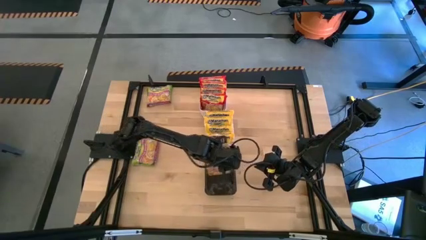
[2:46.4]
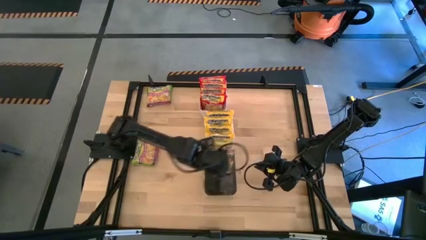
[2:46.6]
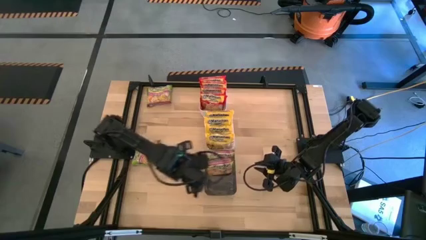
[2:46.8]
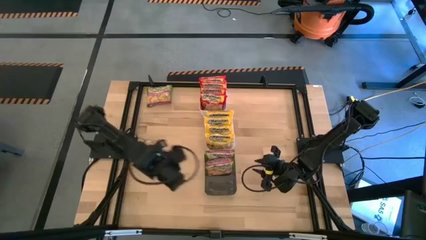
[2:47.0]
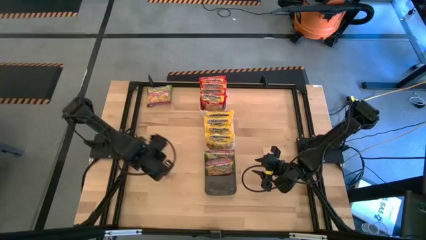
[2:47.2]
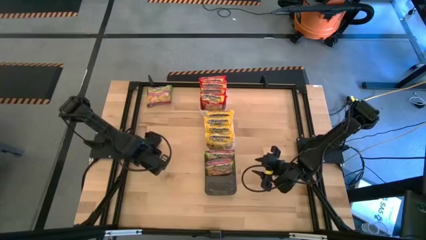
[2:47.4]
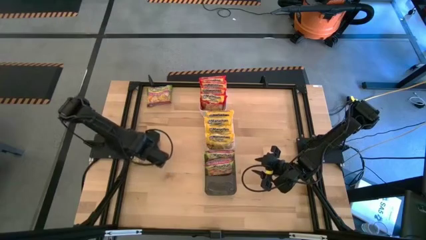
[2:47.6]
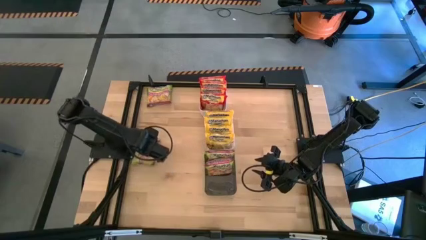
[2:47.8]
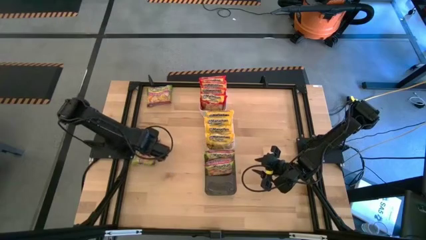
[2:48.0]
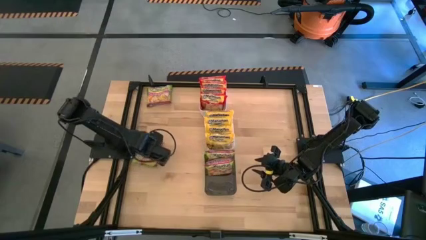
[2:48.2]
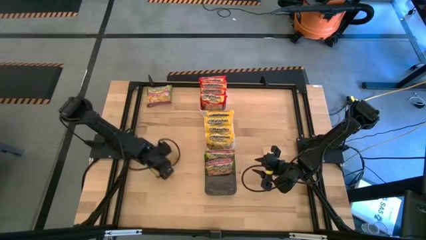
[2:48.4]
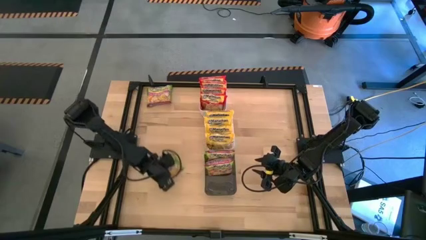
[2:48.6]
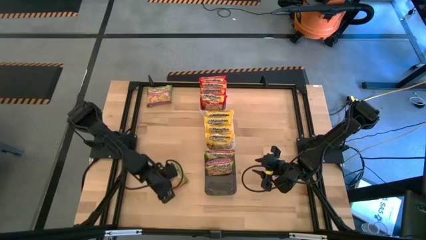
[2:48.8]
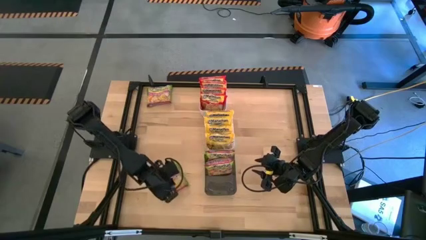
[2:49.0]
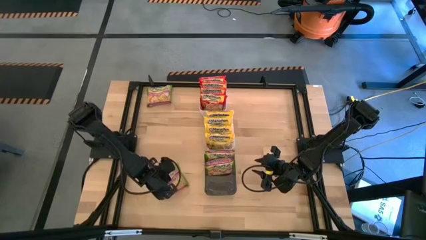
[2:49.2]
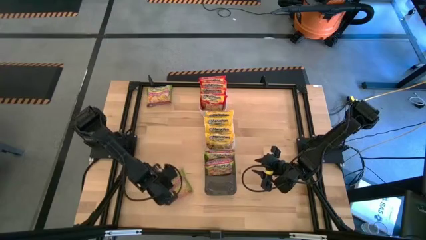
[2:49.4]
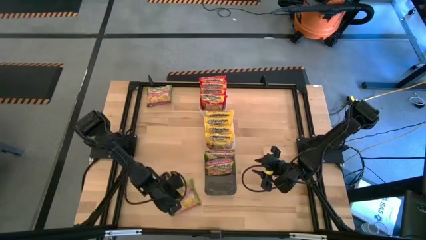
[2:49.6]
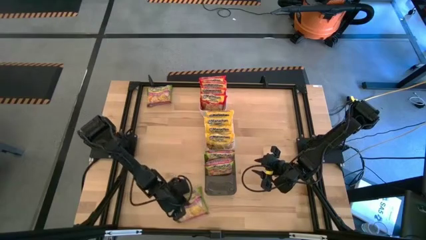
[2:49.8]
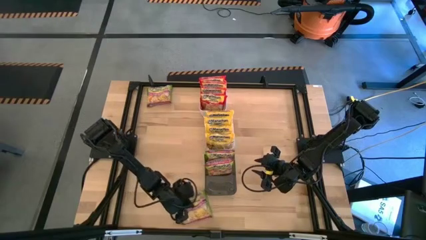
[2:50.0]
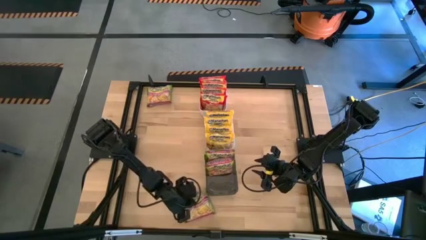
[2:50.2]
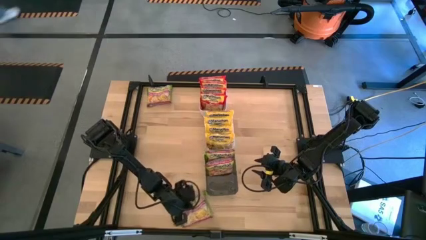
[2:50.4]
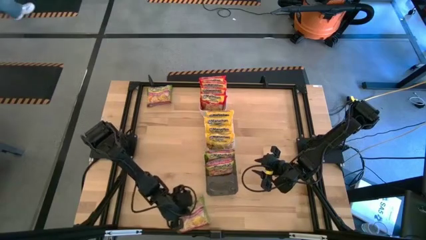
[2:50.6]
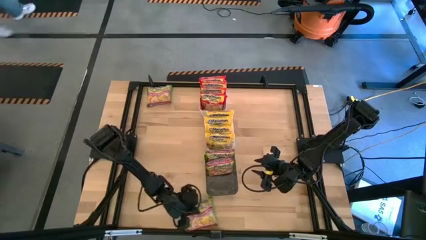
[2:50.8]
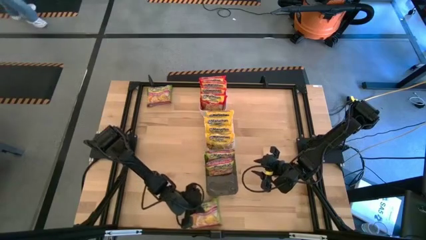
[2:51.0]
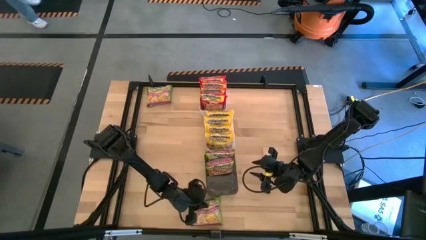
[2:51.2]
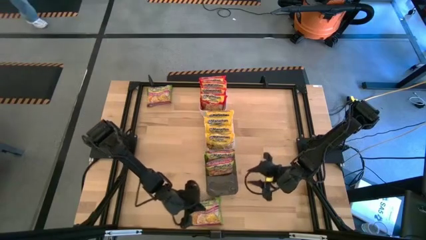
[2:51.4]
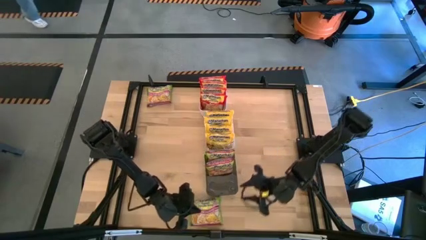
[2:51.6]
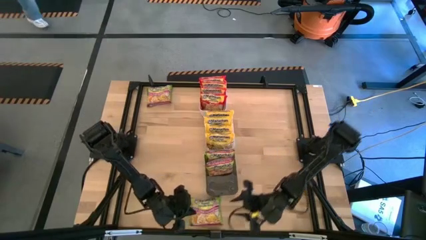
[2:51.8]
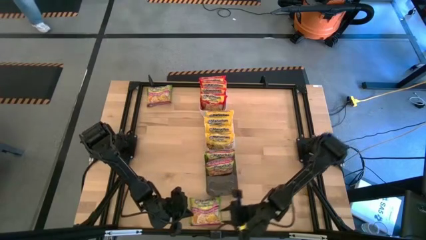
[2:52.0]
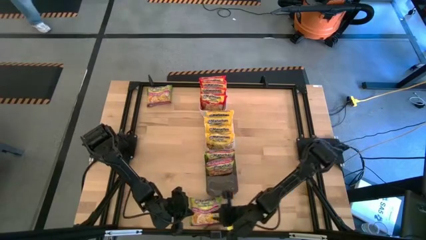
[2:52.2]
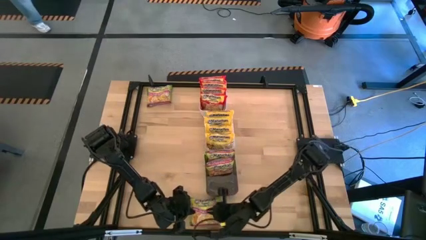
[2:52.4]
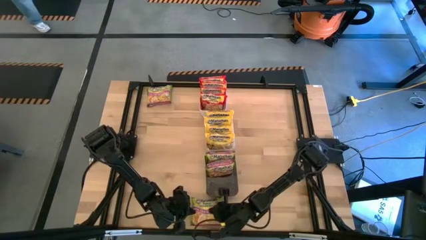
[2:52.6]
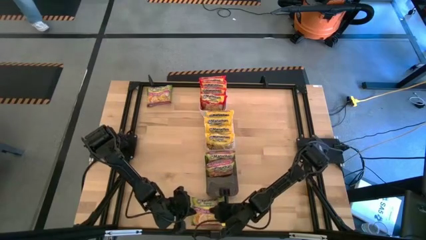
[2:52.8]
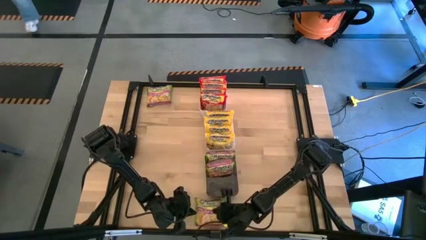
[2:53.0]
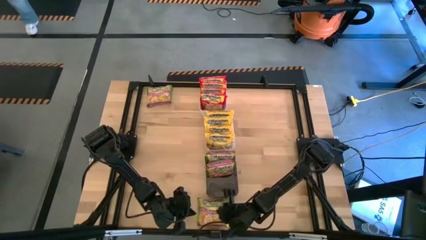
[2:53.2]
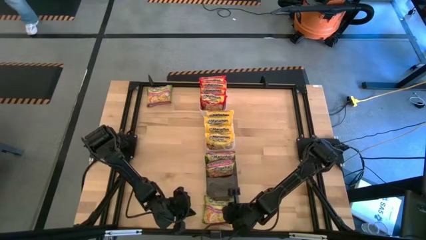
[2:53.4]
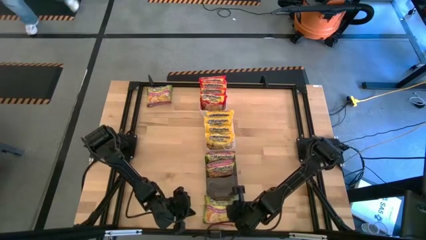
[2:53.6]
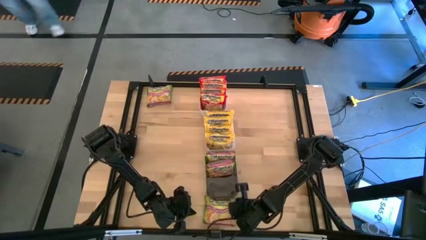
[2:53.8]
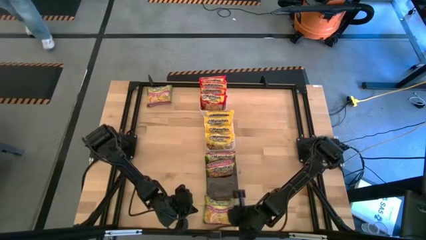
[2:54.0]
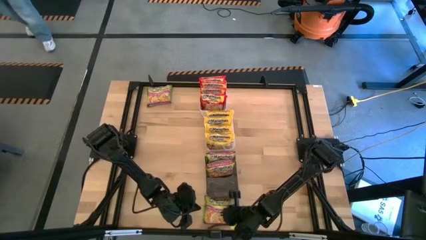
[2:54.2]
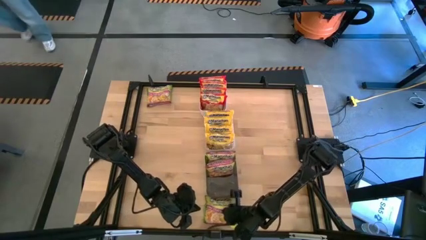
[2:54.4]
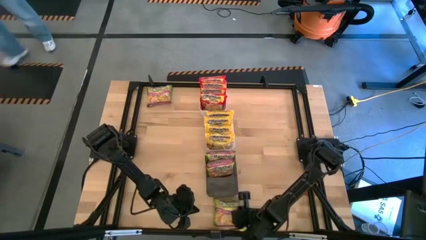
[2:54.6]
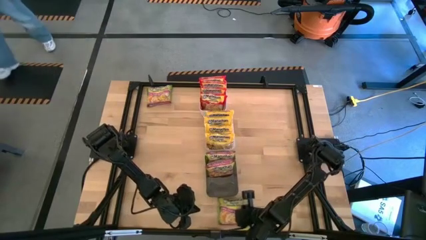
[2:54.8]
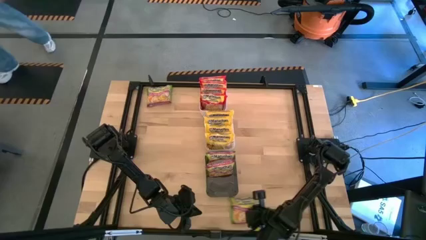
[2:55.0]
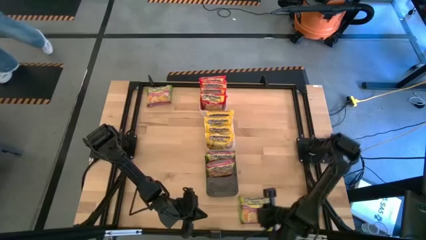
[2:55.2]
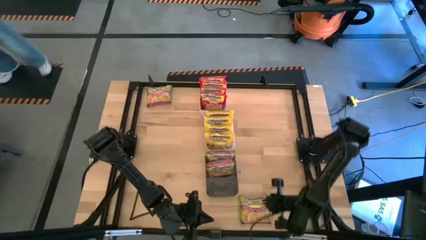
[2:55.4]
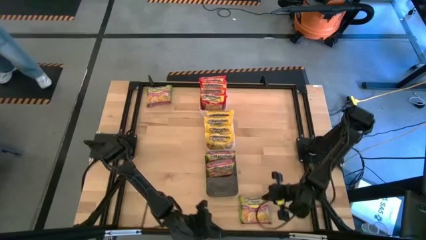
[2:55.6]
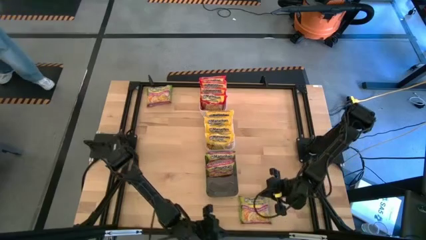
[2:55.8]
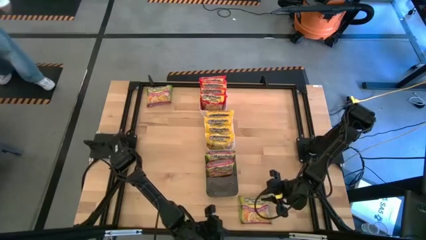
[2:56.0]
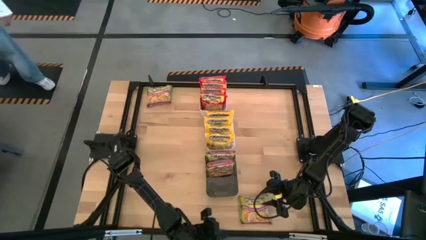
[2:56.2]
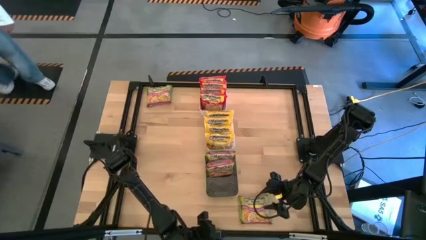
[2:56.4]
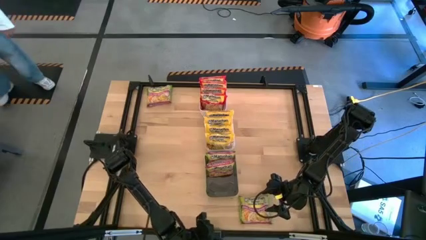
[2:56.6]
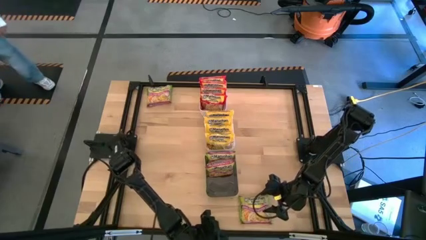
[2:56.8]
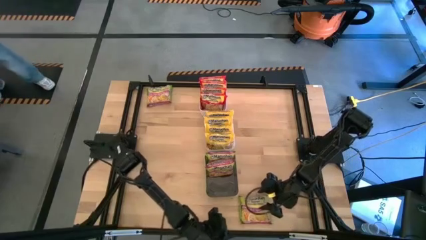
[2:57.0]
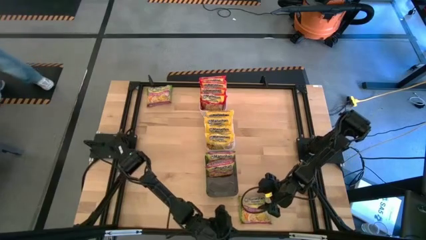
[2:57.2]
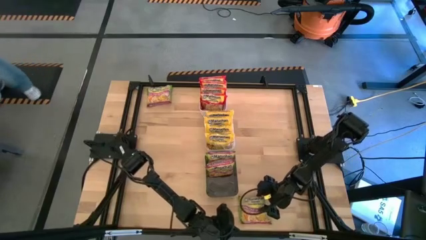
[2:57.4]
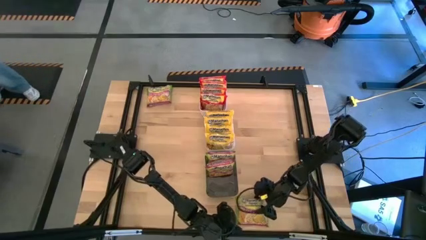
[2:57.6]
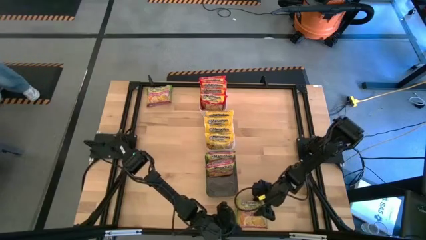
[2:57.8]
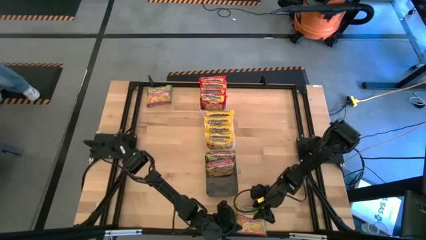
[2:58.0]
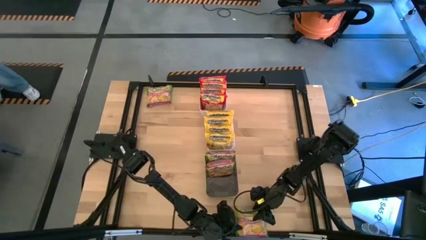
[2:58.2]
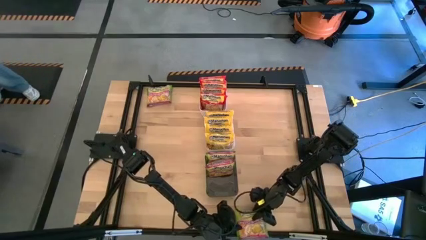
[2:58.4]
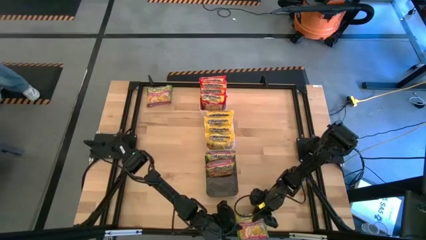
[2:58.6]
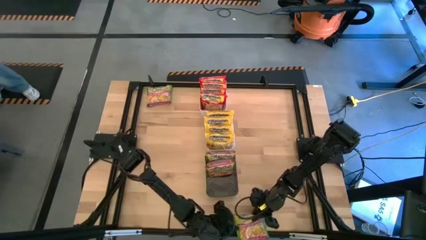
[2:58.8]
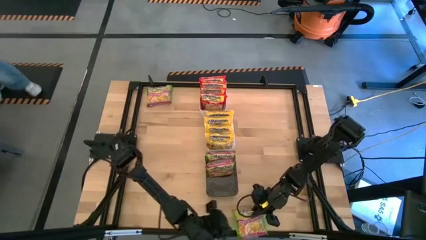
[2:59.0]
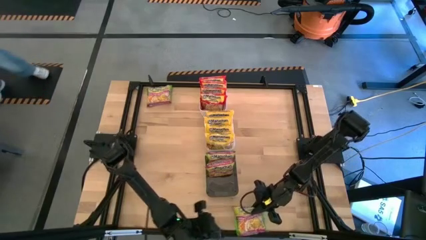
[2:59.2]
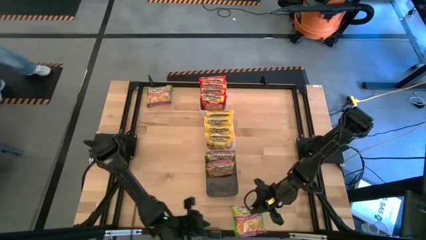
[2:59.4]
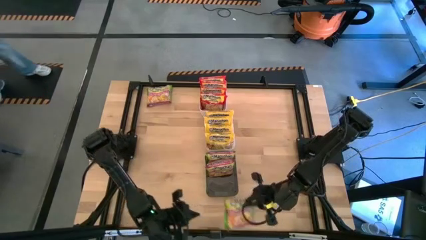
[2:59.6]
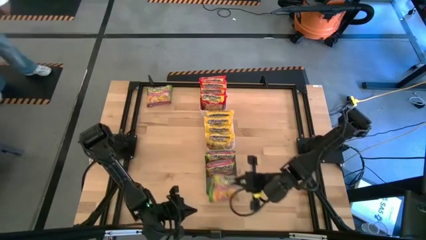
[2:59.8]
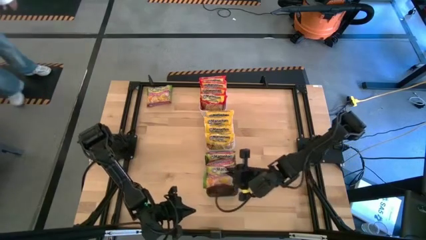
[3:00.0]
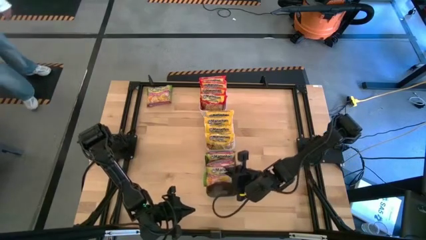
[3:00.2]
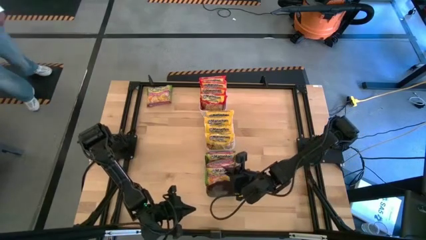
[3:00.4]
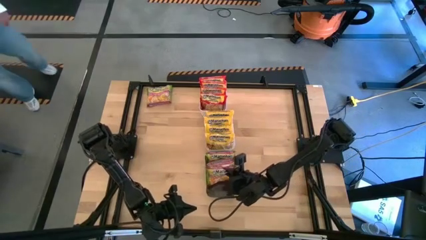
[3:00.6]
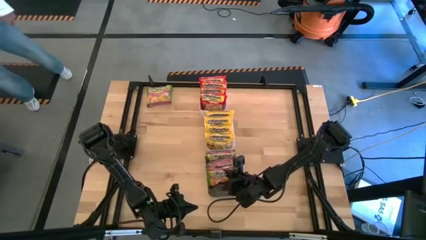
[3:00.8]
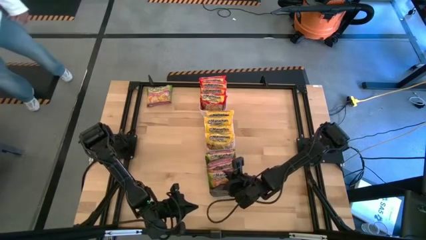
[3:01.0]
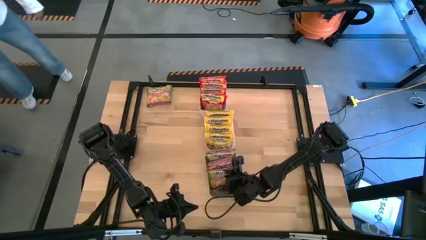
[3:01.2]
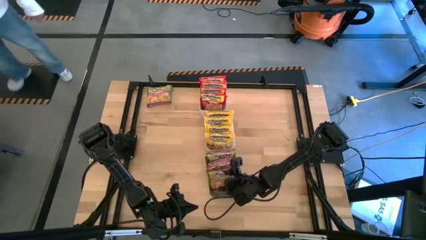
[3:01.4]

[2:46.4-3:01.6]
Task: Sort Maruchan noodles
Put the green noodle pack into the black bin

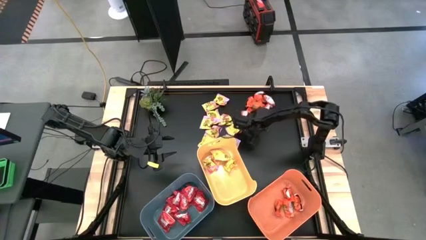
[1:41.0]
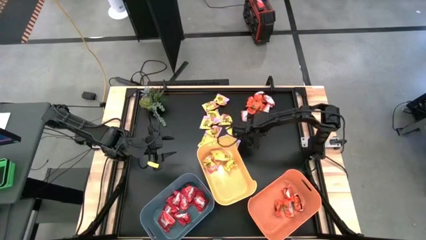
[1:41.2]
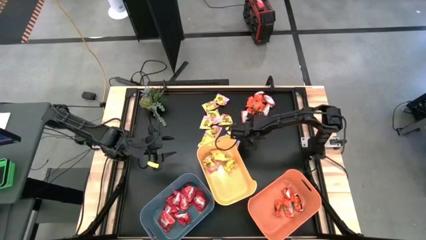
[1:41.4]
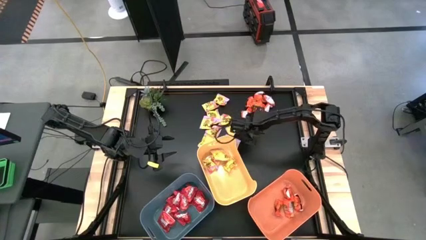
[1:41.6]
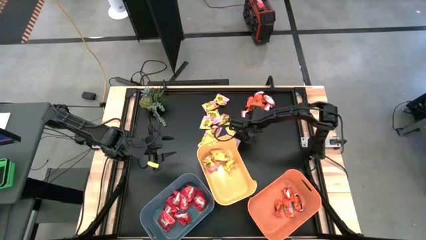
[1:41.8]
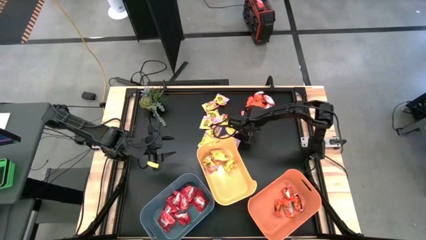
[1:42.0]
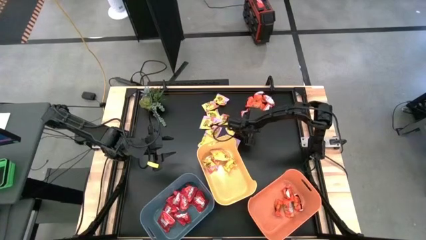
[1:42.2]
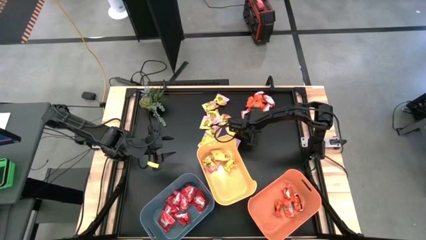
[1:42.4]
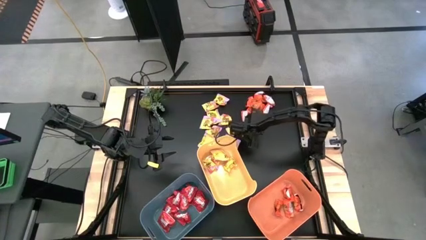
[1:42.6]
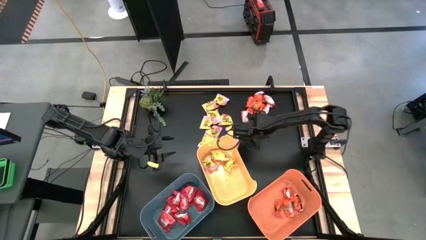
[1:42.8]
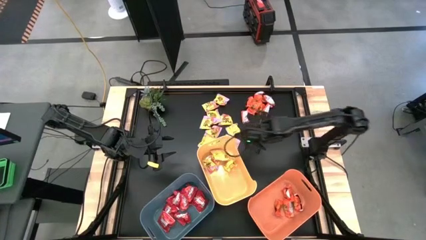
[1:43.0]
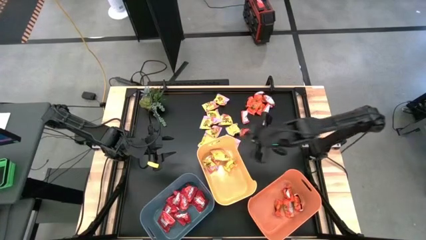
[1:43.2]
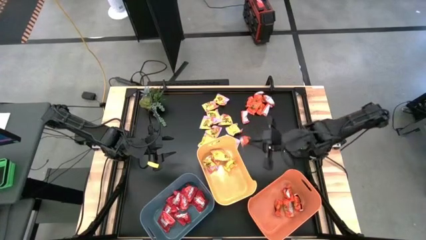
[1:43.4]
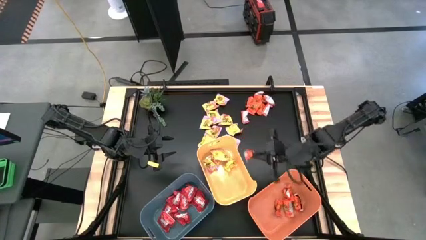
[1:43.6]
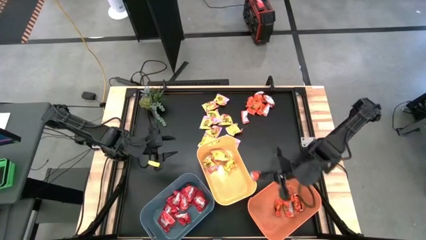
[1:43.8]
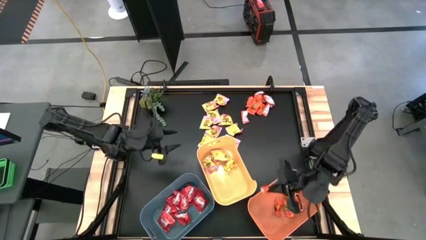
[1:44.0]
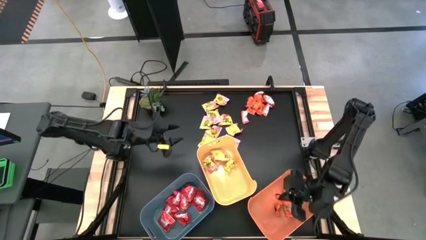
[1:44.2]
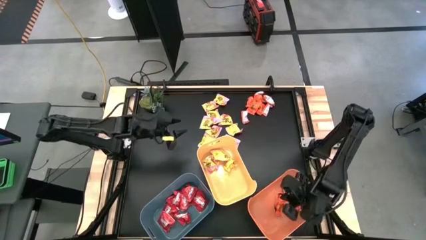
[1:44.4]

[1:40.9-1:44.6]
Task: Sort candy
Put the orange chocolate into the orange bin
